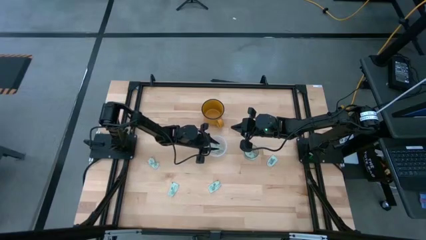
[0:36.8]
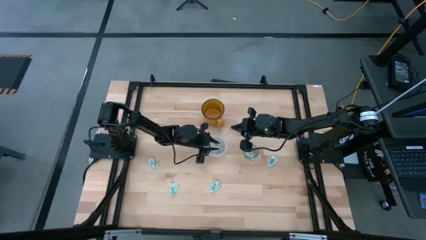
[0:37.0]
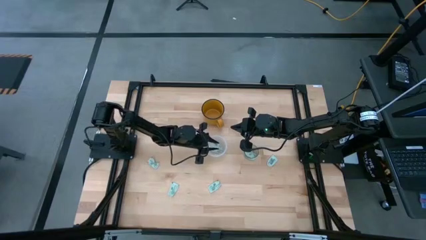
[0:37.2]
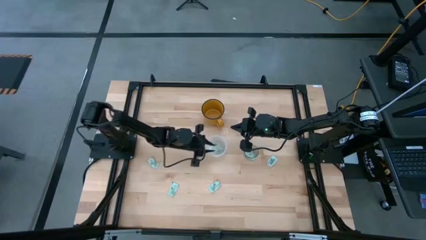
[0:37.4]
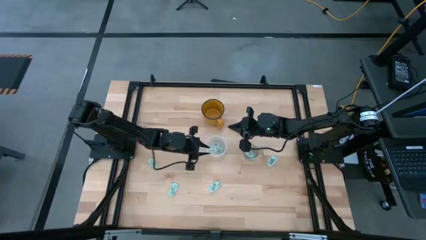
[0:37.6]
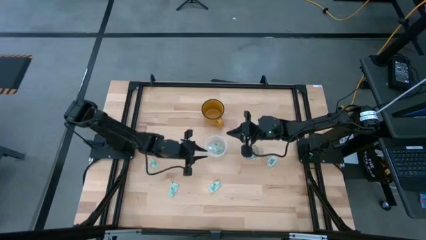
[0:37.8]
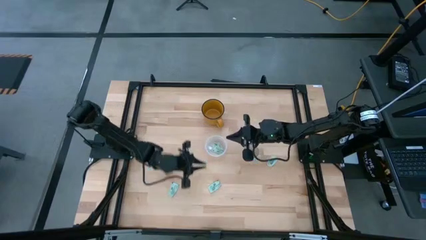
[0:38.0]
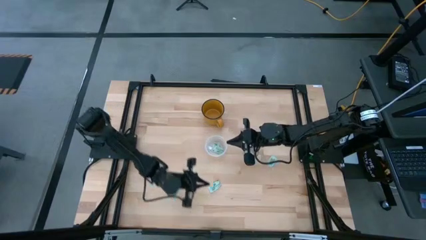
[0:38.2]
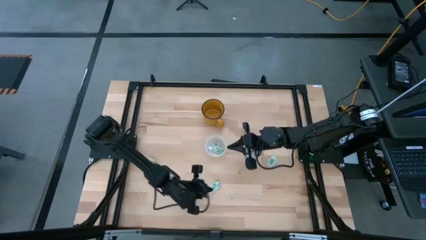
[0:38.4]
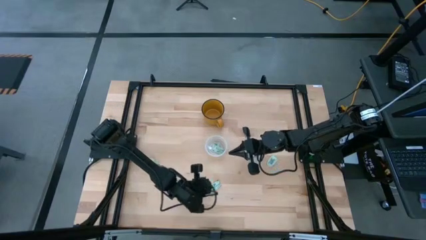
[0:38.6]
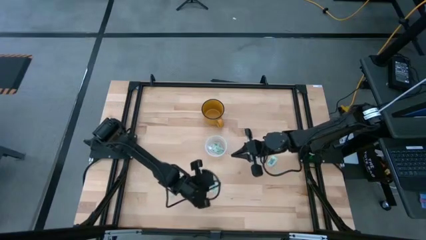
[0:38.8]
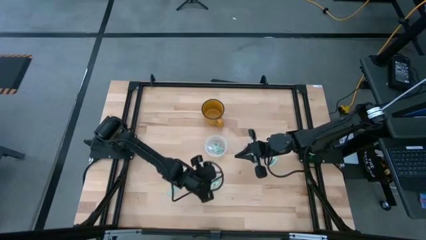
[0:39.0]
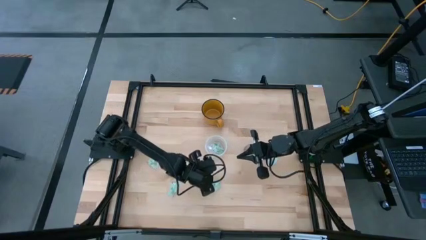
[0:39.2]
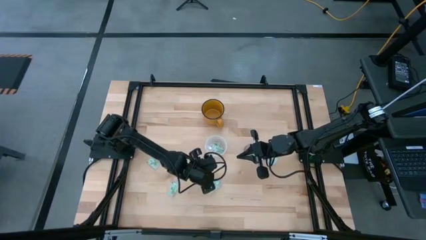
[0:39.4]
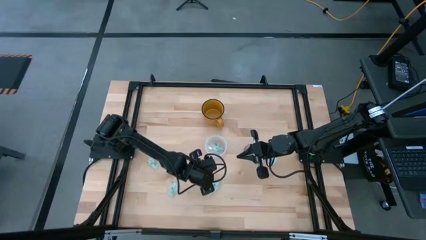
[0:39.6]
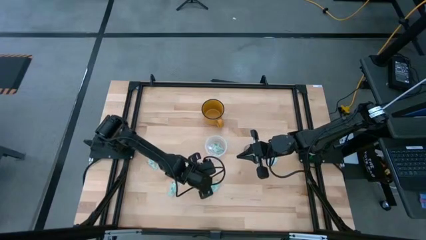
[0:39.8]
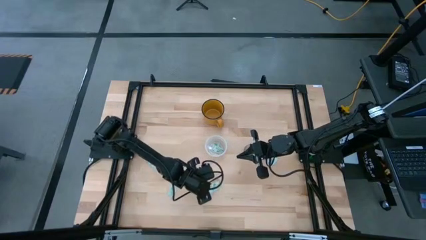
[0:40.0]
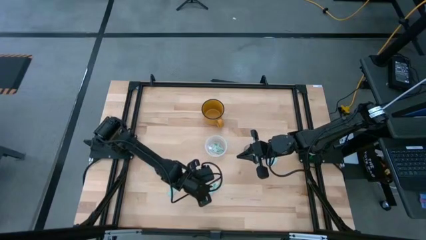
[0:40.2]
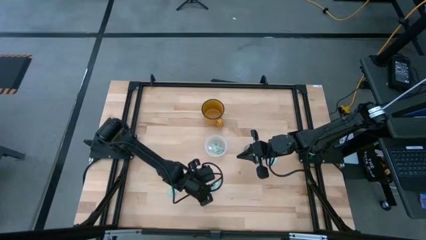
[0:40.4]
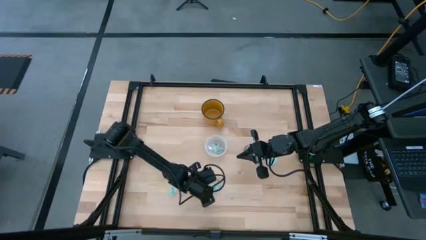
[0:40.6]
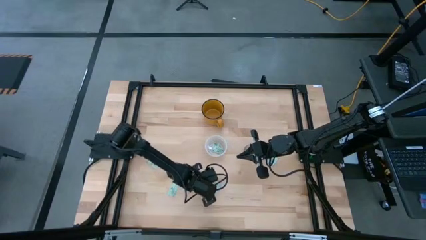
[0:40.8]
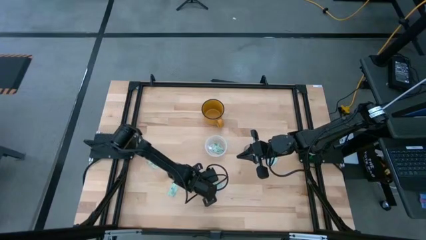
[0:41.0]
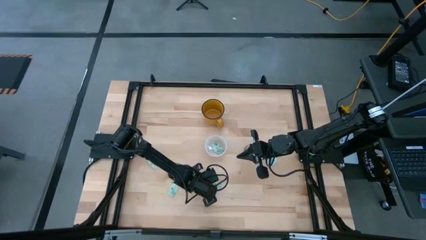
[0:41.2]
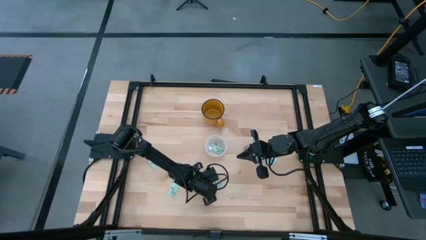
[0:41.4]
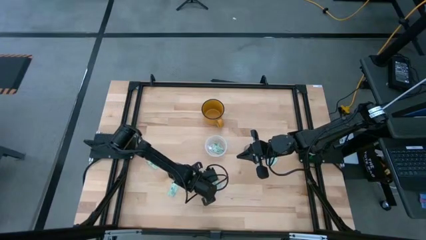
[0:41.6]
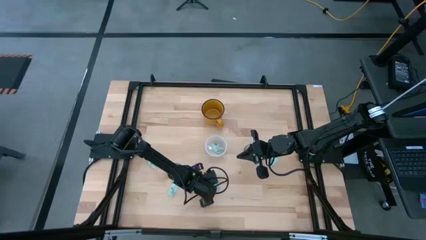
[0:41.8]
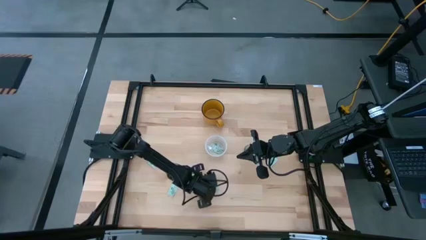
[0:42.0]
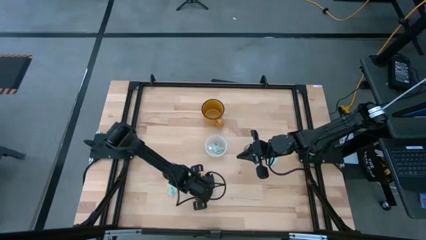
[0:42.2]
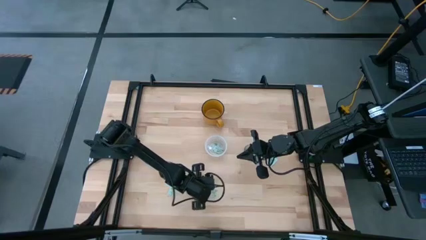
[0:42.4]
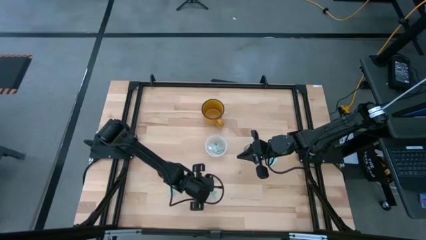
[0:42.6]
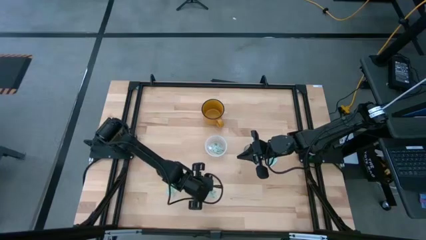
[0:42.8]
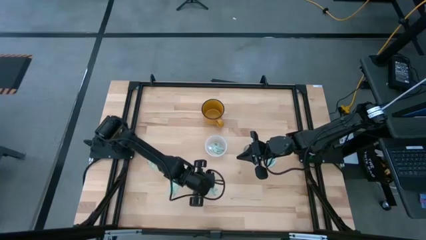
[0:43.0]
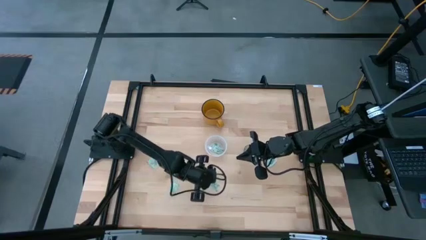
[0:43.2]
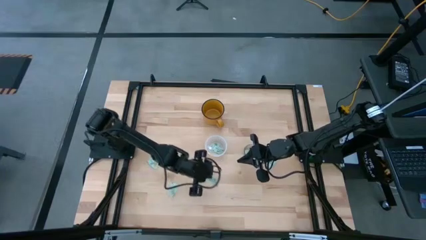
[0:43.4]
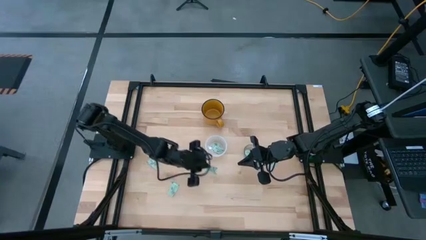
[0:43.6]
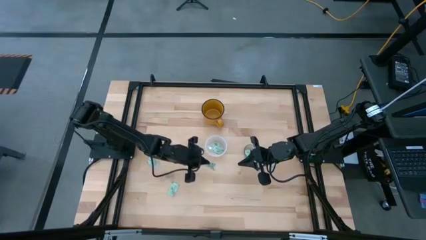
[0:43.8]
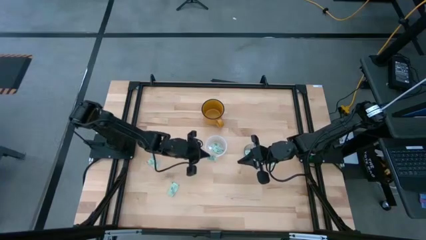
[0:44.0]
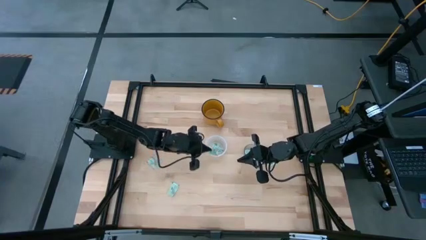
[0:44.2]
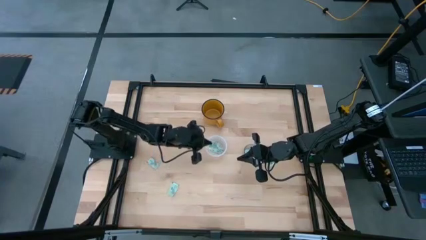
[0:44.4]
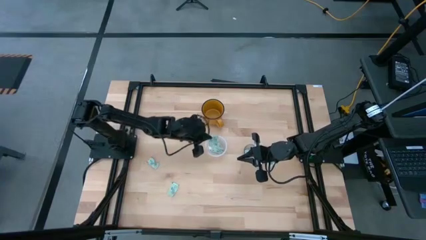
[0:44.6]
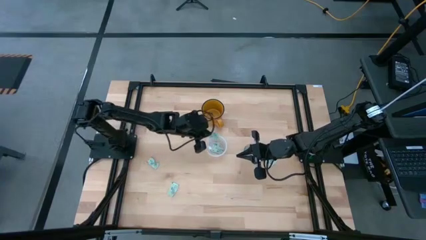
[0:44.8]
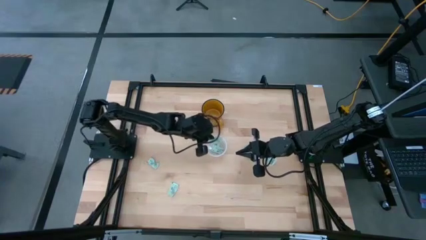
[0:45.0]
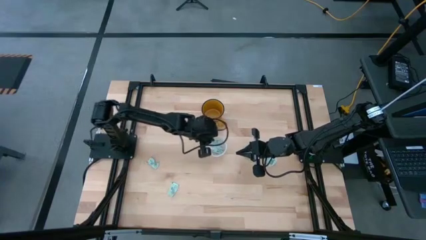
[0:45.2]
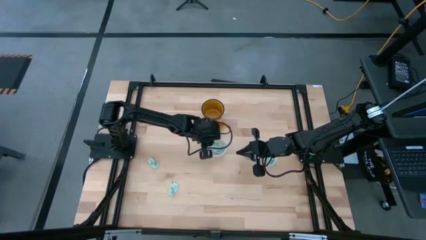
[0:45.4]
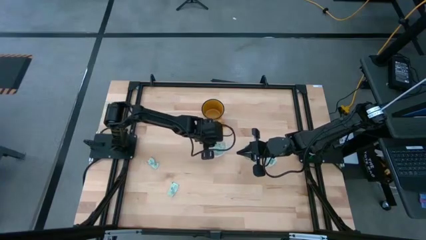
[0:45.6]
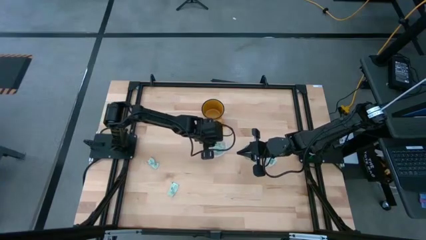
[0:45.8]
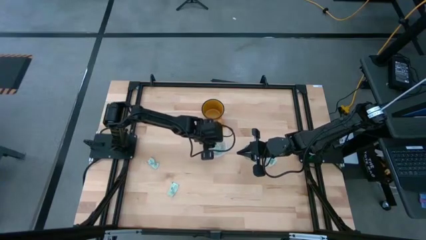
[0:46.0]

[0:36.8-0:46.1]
Task: Pick and place Stevia / Truvia into bins
Put the green stevia packet into the transparent container

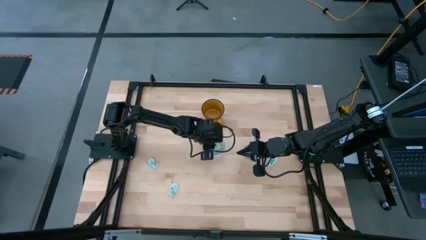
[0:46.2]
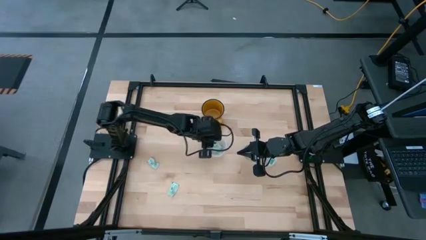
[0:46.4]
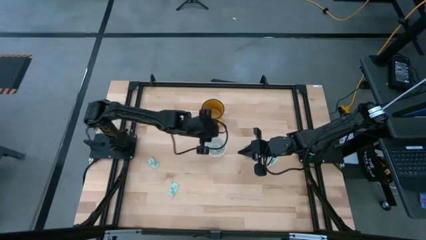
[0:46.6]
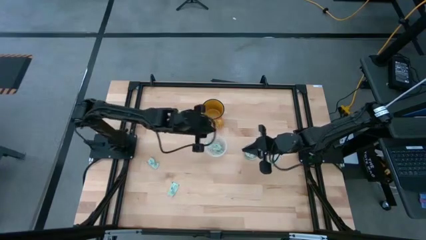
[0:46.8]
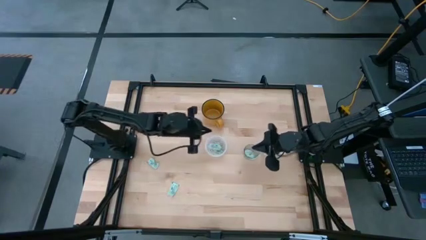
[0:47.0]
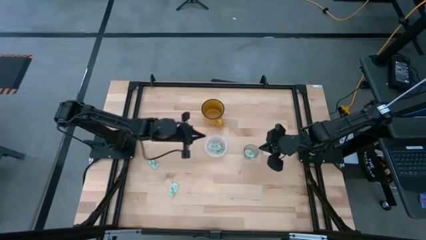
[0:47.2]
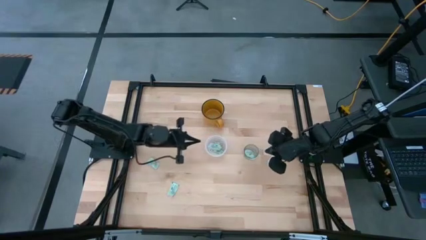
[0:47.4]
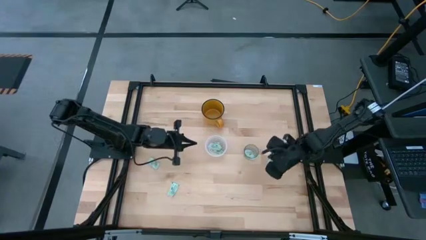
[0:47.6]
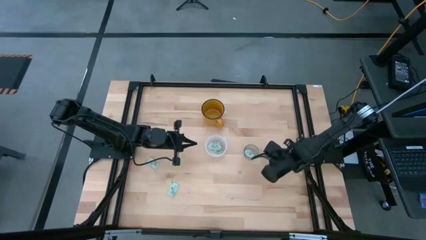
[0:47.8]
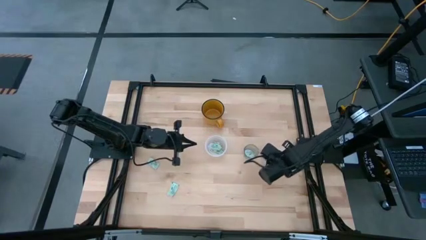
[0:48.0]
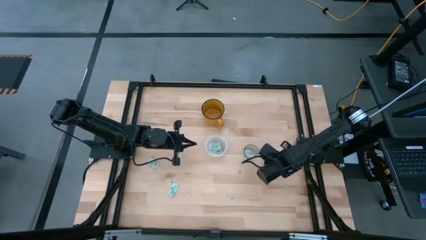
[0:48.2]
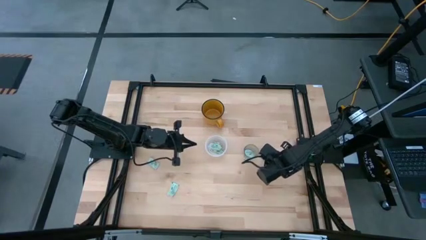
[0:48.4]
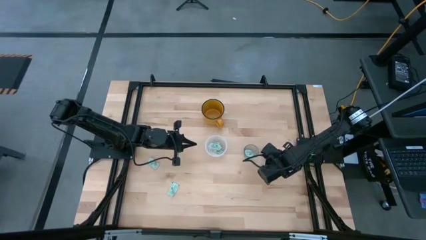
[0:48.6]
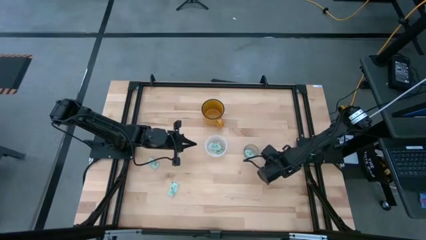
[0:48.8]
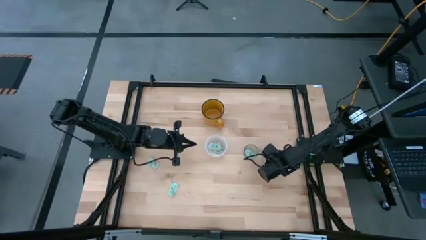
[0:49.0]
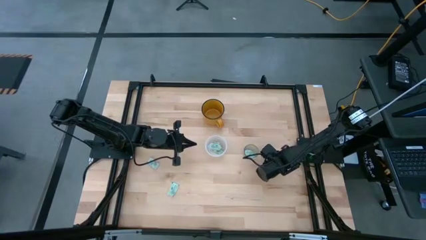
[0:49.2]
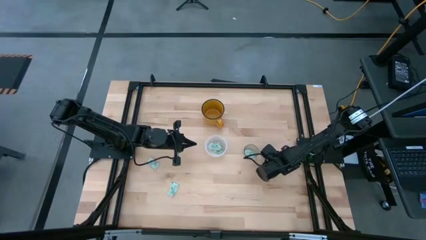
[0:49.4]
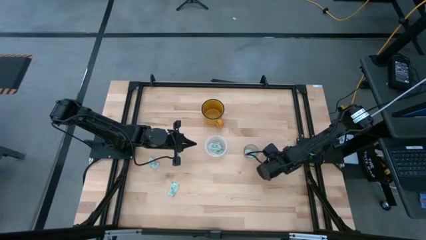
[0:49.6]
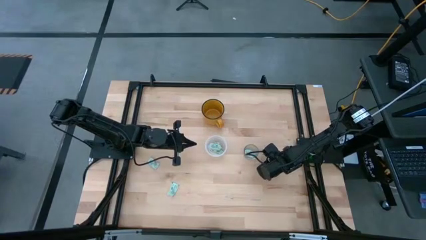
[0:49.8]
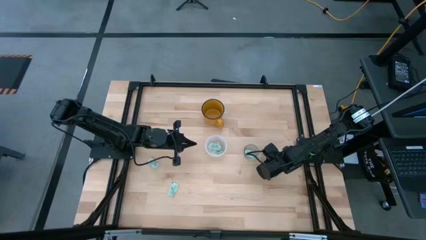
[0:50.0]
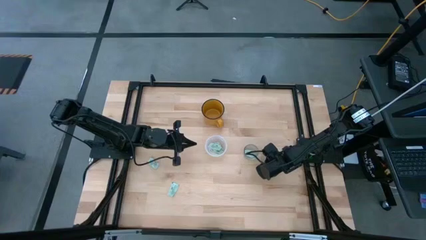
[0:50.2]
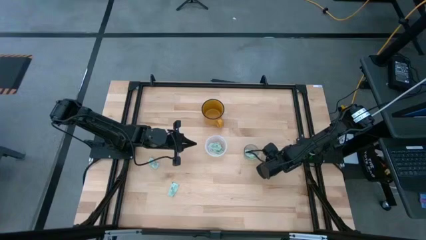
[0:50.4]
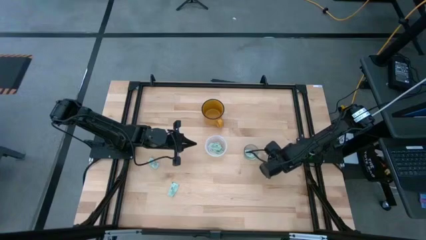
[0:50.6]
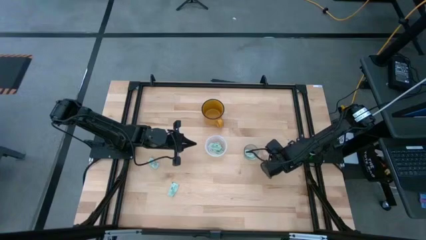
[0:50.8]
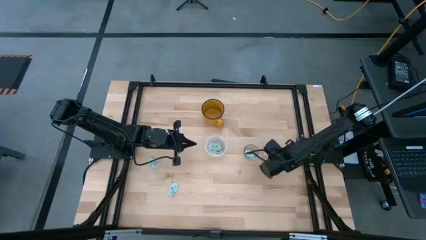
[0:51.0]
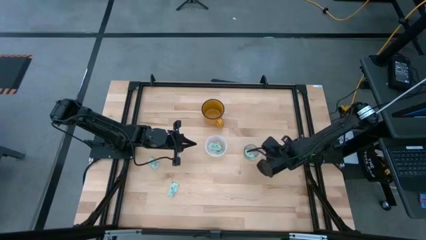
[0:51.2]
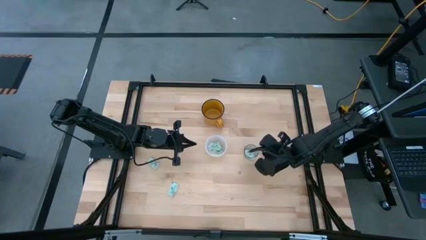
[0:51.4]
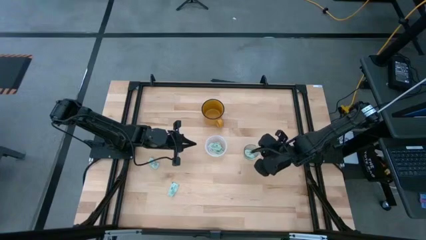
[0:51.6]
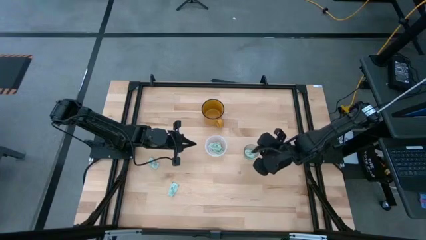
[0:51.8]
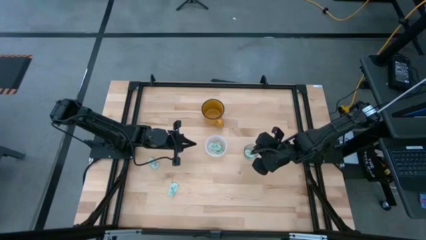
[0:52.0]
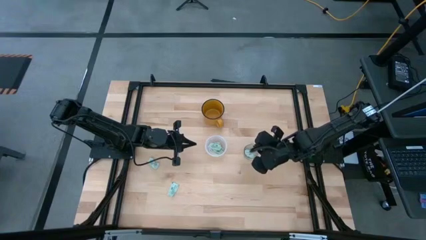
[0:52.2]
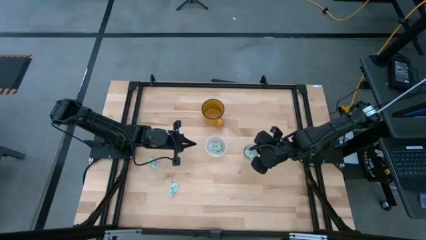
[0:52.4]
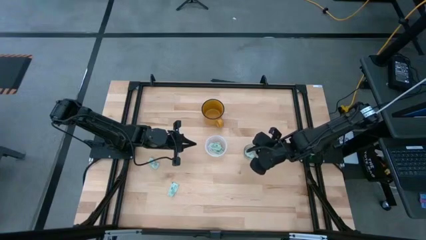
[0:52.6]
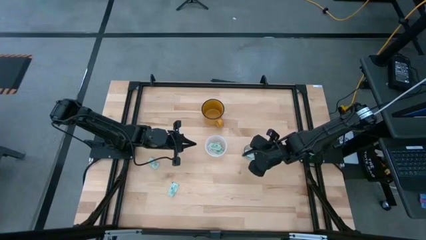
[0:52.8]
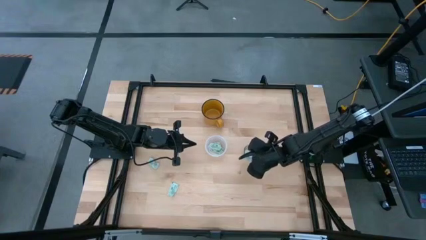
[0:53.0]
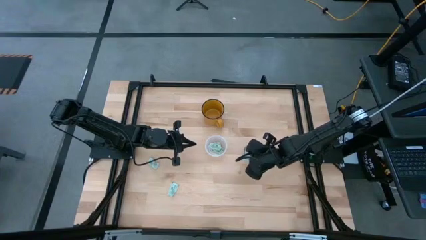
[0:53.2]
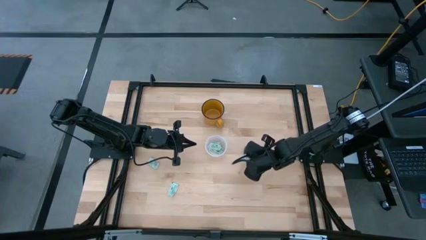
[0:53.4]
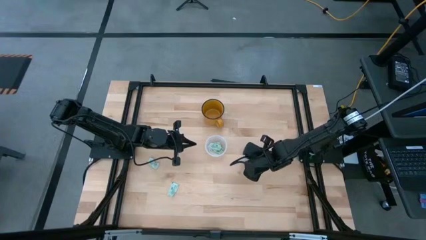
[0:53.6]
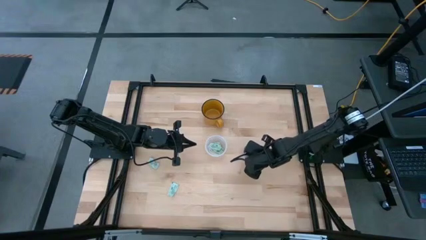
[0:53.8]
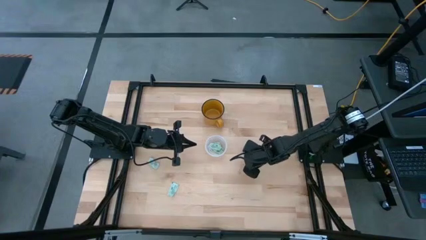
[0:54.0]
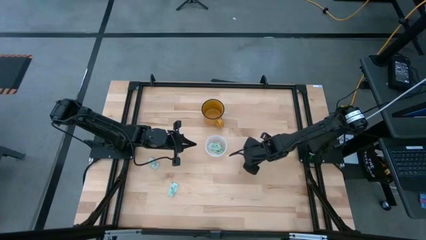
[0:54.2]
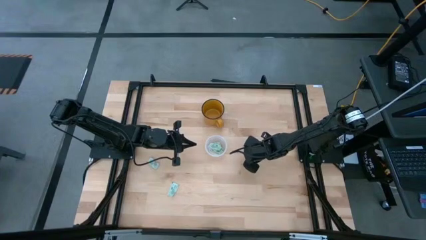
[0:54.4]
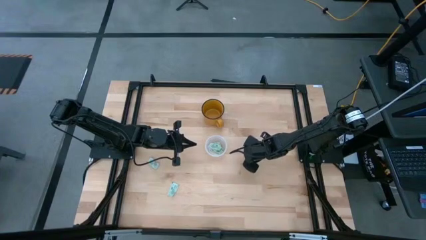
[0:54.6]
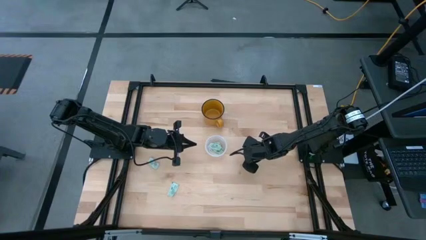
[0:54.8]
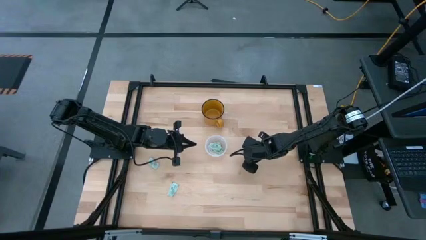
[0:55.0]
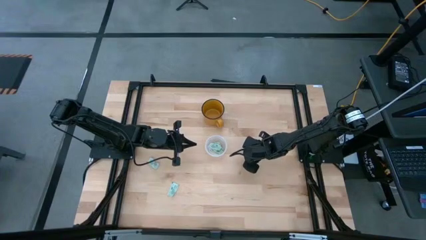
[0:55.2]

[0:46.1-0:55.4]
Put the green stevia packet into the glass container
